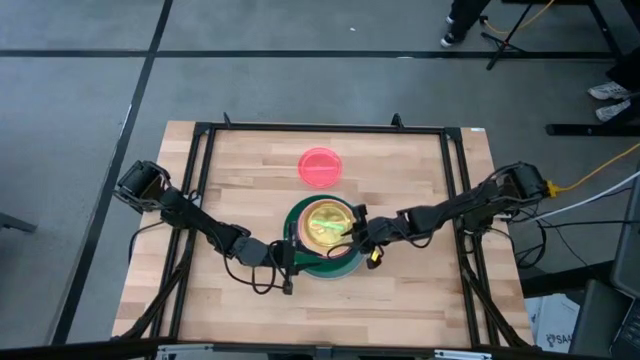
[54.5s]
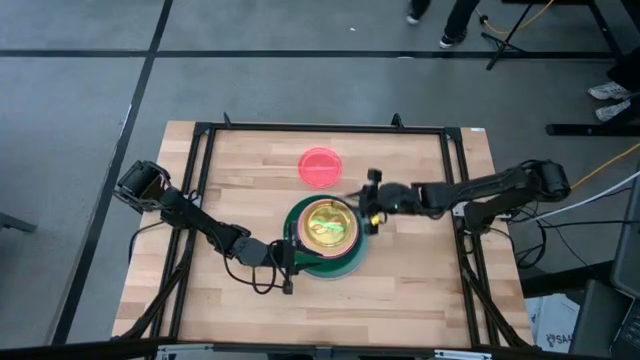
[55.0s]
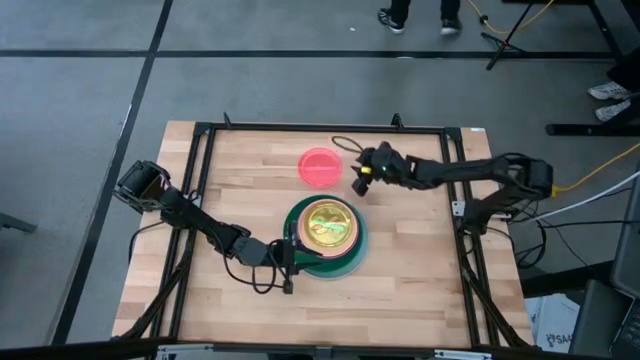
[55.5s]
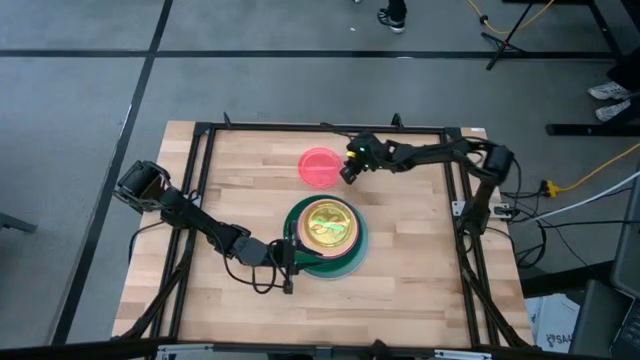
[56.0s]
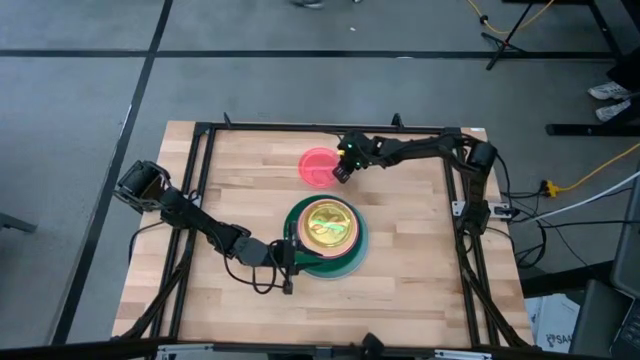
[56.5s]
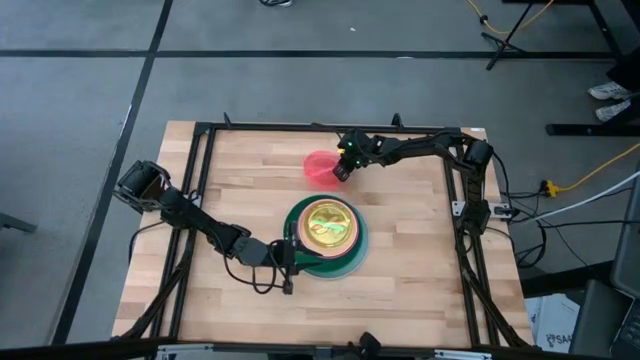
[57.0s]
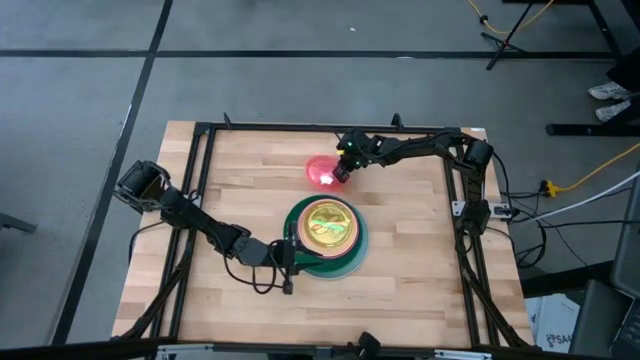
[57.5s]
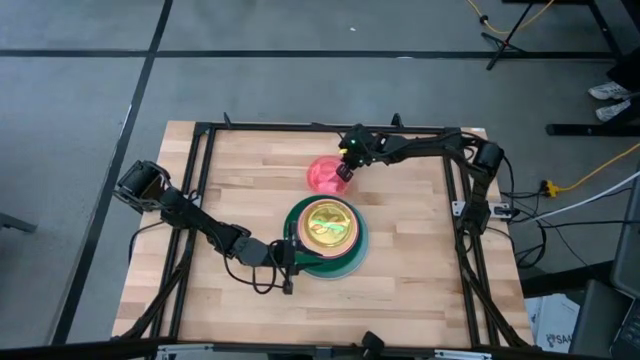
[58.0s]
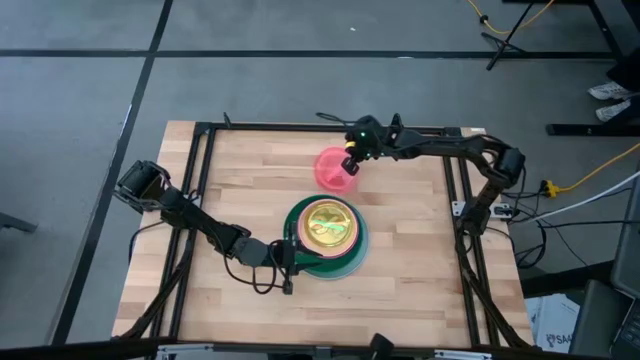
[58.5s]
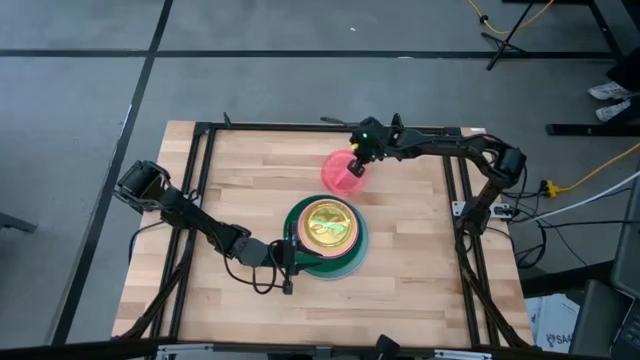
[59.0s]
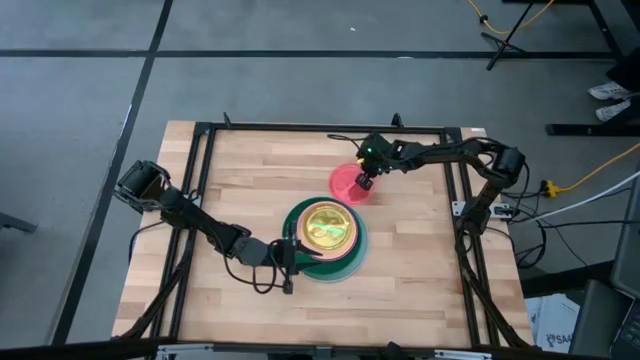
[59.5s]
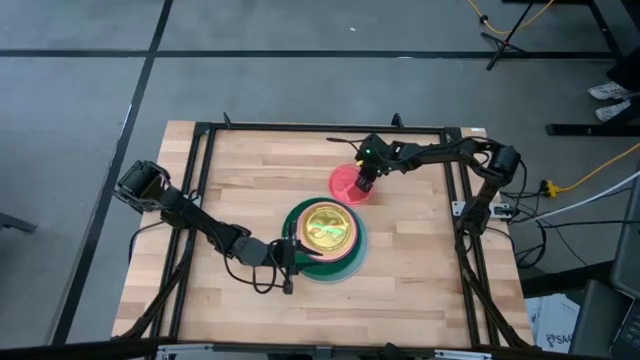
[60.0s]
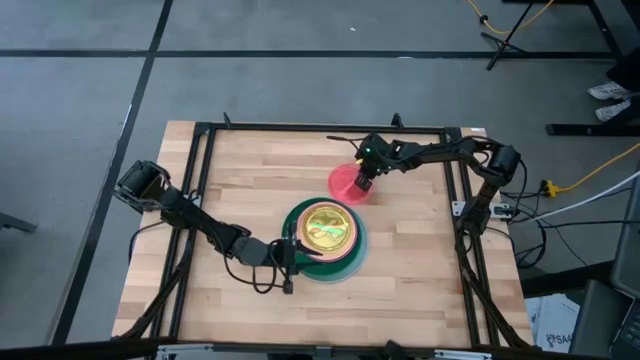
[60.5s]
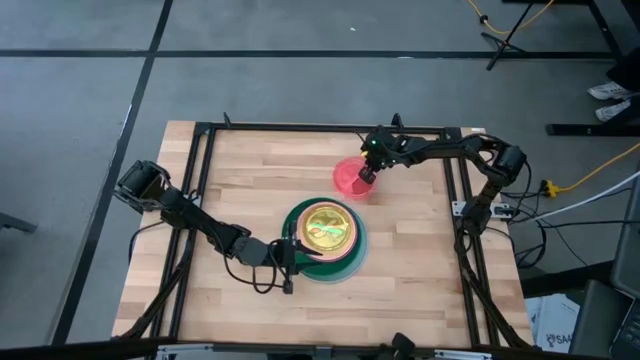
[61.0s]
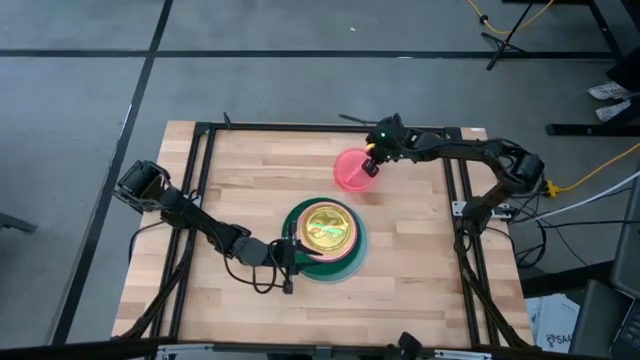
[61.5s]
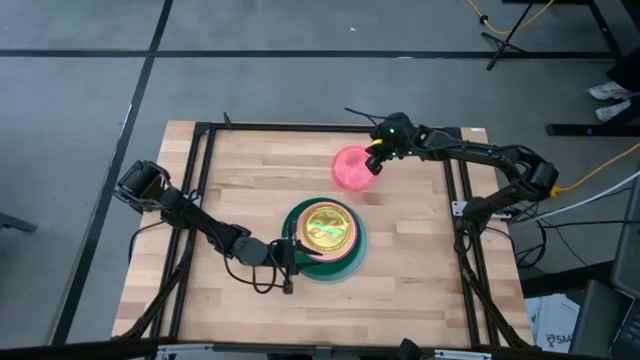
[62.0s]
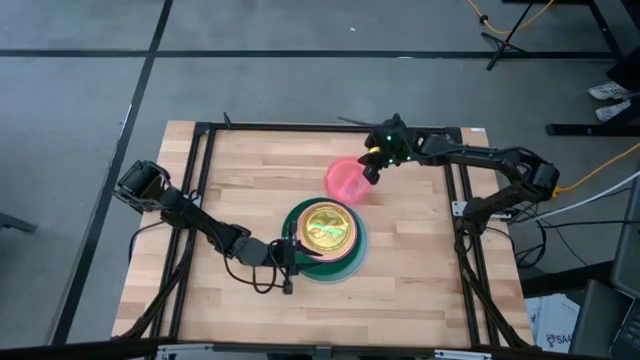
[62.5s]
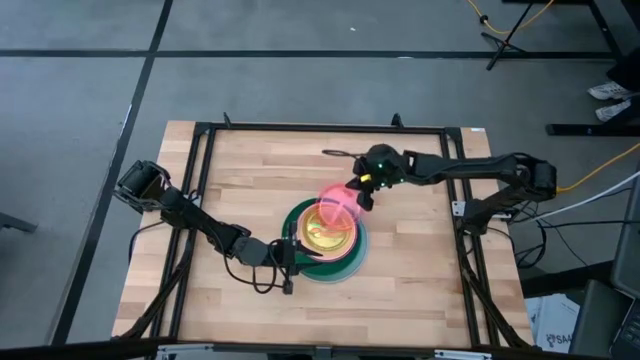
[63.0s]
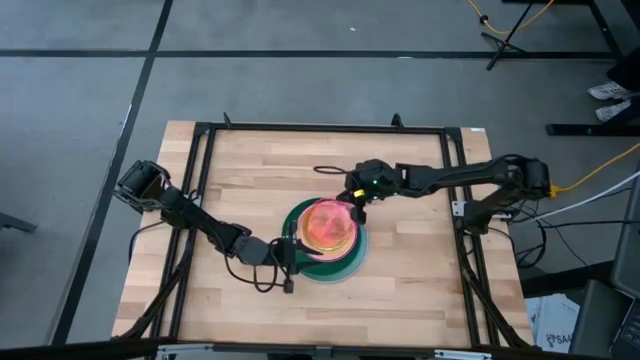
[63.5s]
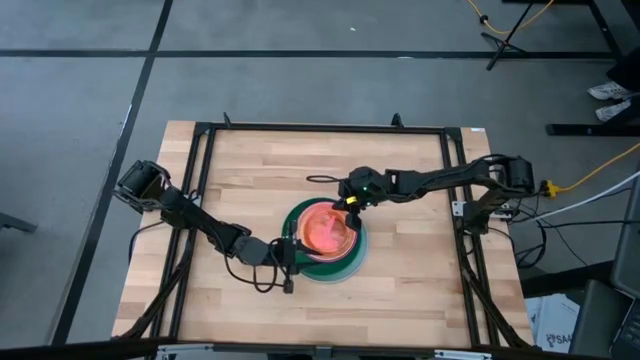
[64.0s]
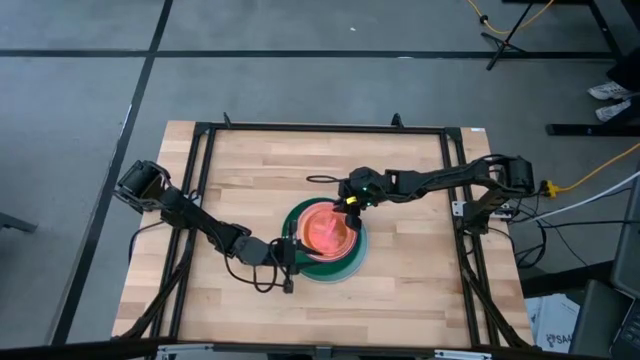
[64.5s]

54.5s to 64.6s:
Task: Stack plastic plates
Stack the transparent pink plate on top of the transparent green plate

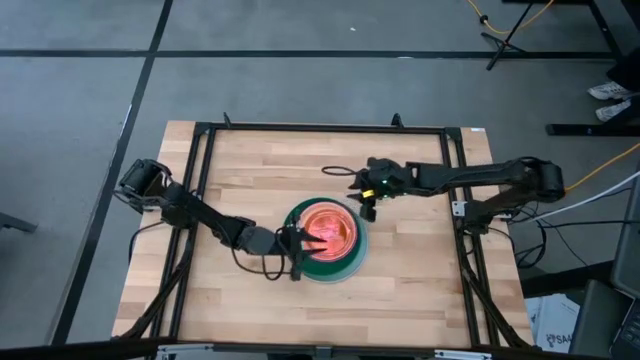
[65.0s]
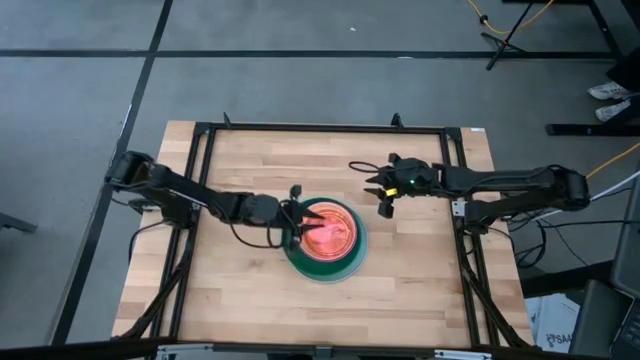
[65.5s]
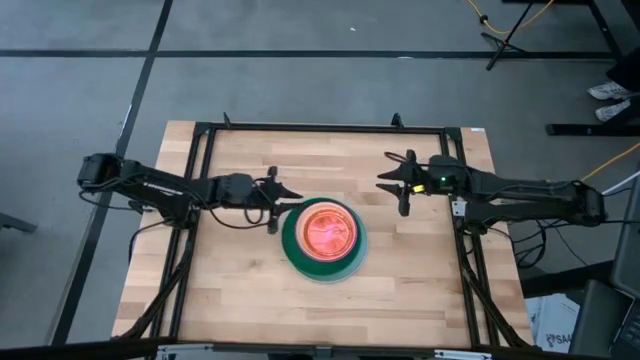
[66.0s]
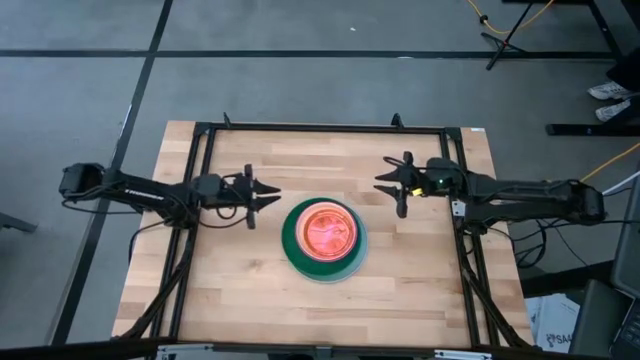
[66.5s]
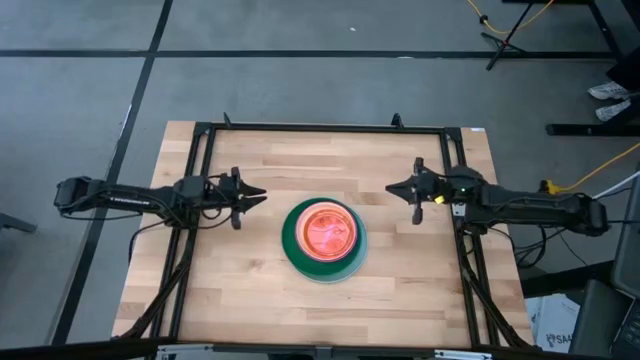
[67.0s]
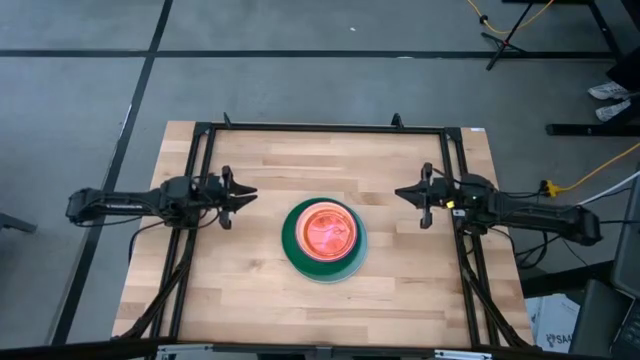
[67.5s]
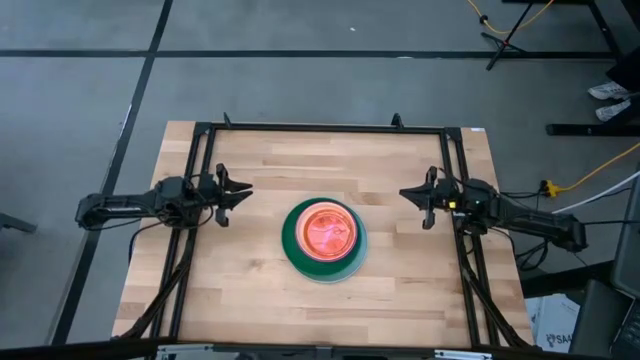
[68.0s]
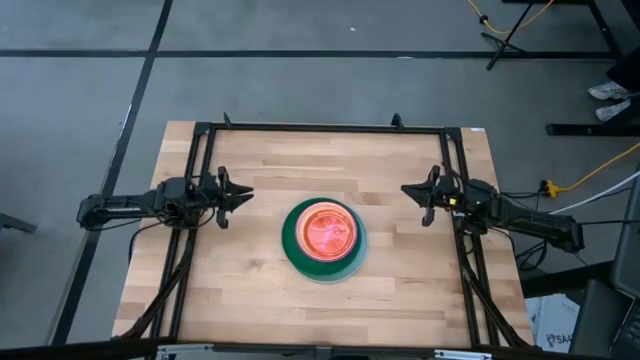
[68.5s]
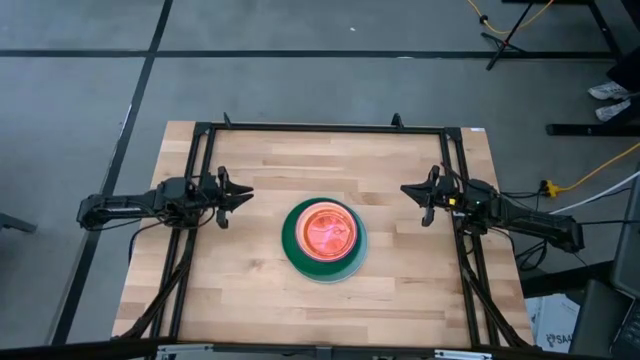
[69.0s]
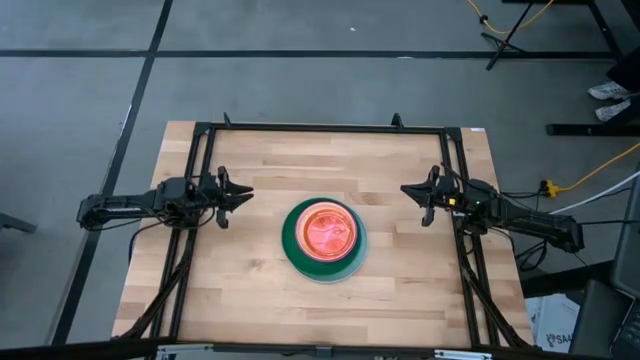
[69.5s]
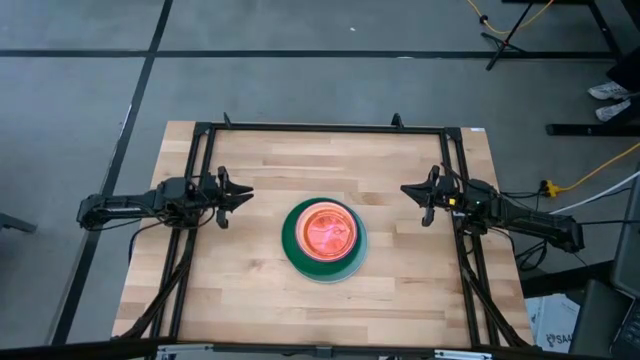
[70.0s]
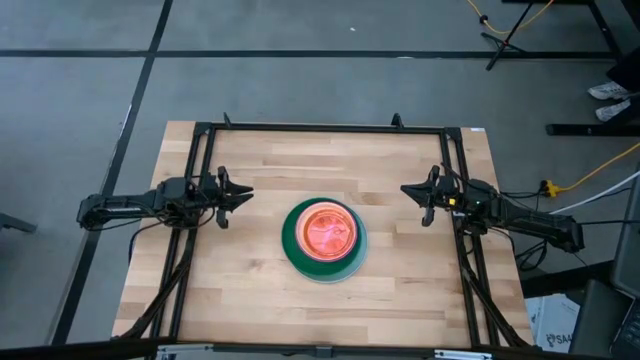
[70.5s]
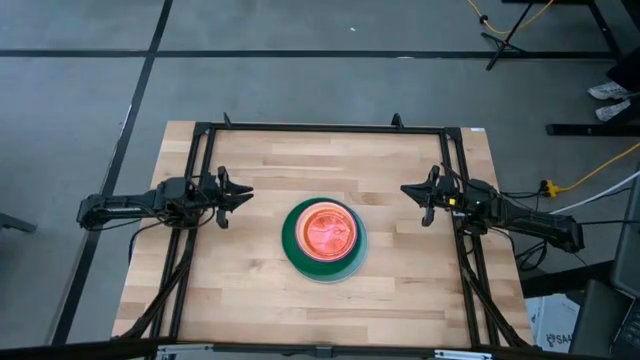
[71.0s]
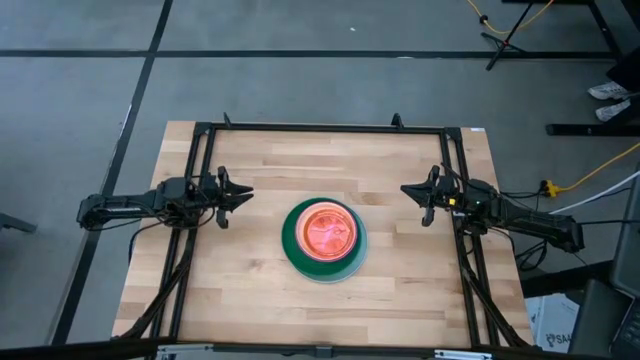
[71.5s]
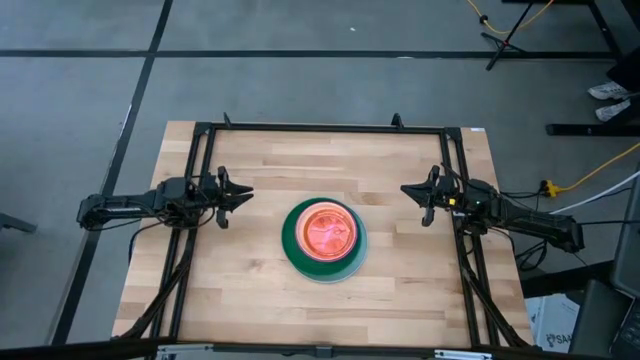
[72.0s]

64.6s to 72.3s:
Return to Home Position

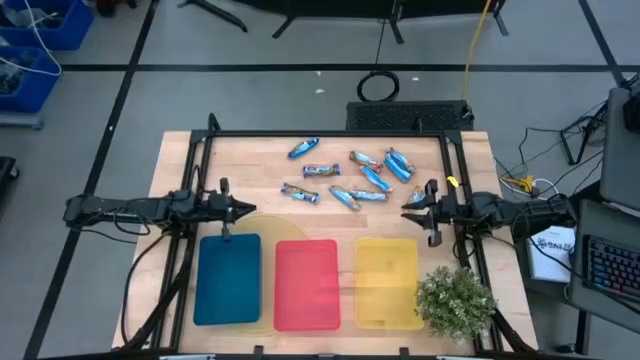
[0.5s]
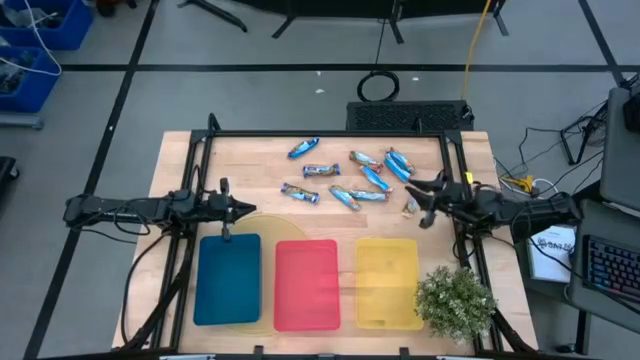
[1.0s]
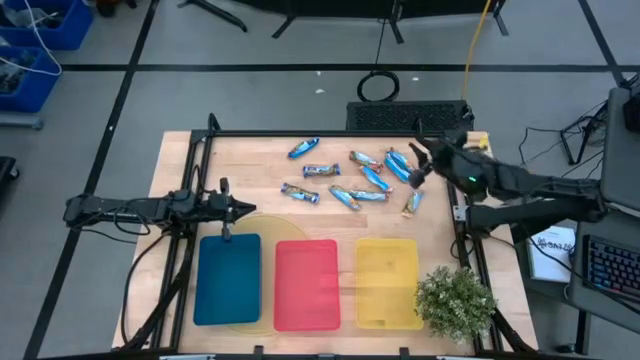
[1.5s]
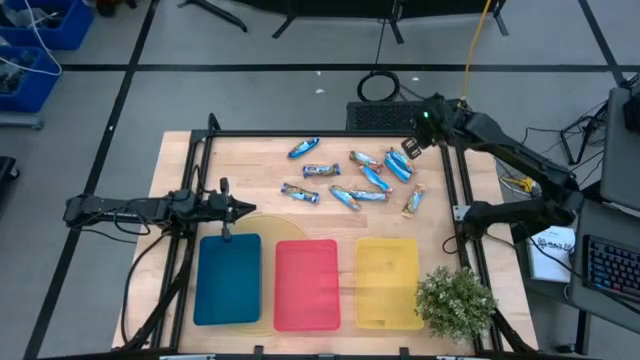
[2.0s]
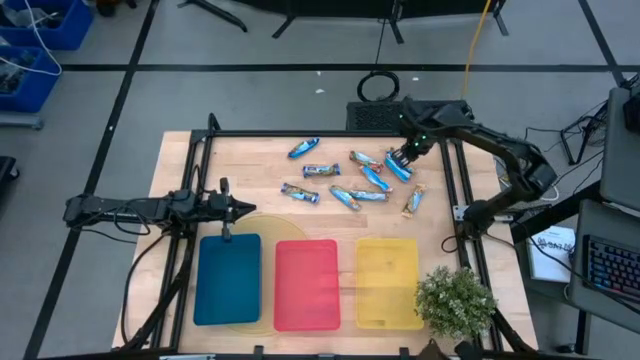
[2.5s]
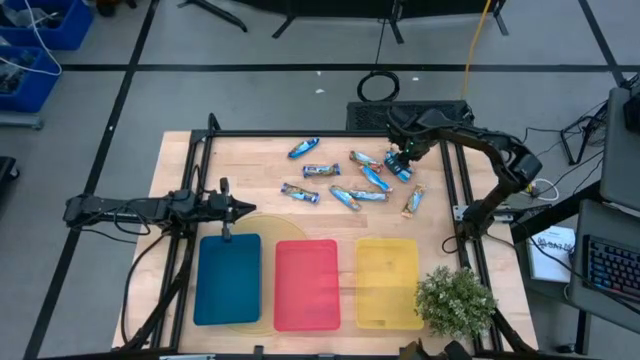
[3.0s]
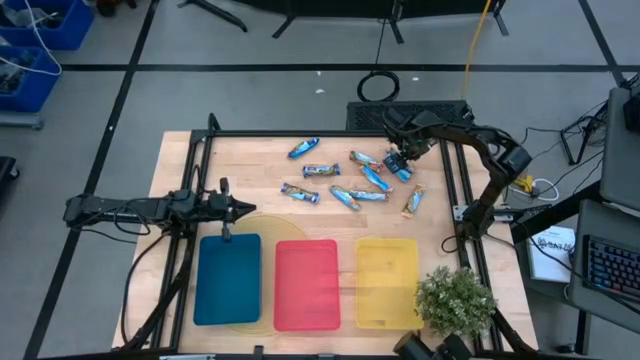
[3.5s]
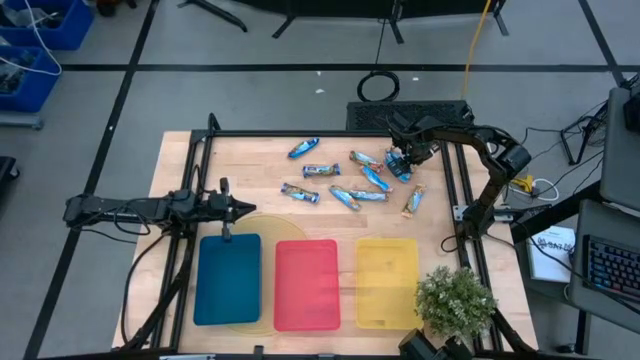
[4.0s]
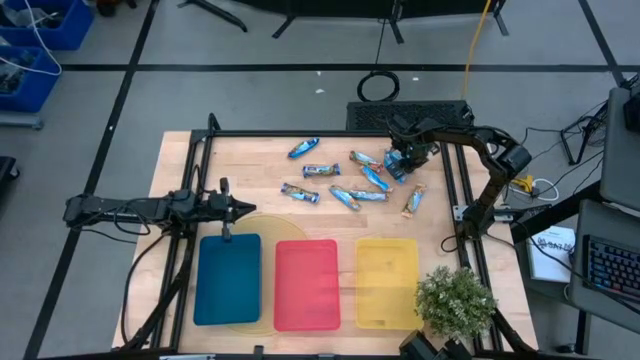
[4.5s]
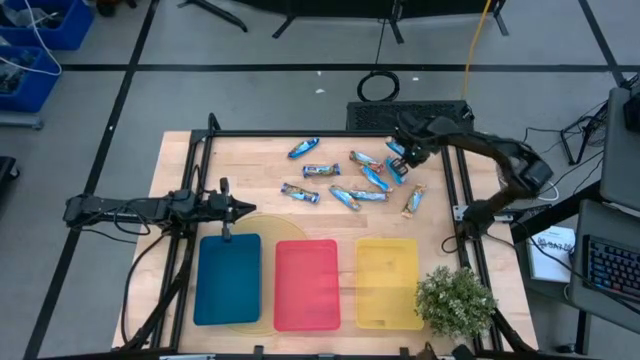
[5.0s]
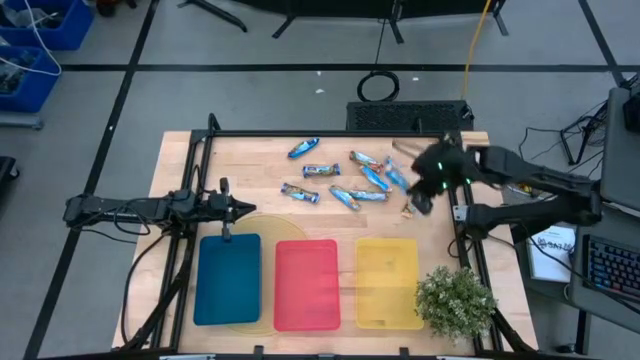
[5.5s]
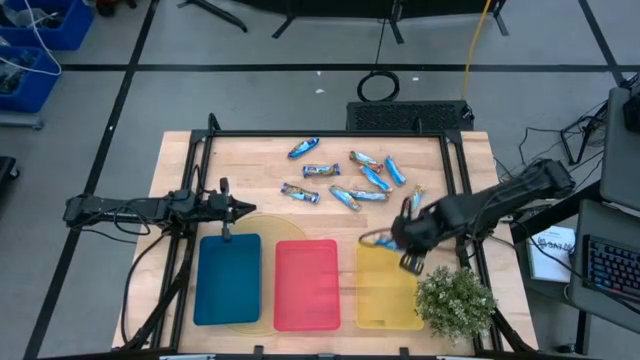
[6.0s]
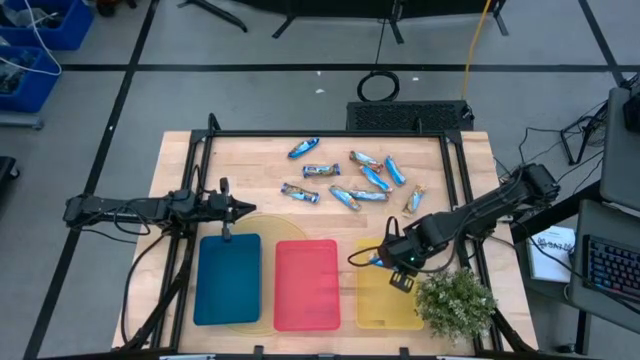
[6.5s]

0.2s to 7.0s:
Task: Pick and place Granola Bars by type
Put the top yellow granola bar into the yellow bin
